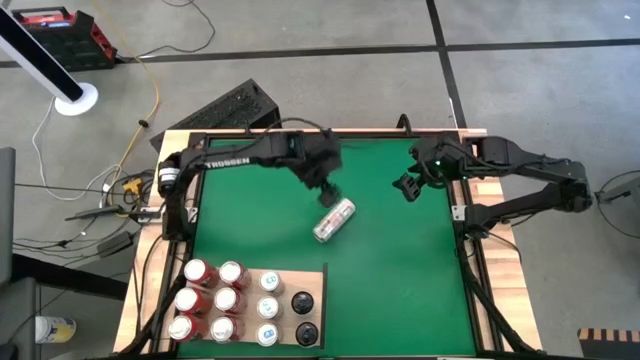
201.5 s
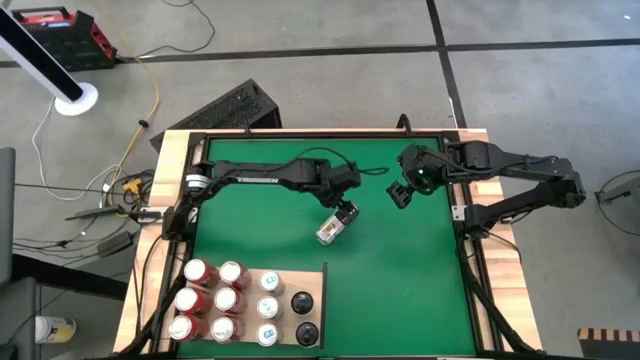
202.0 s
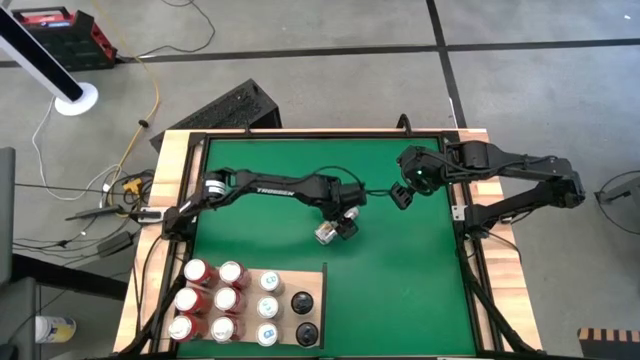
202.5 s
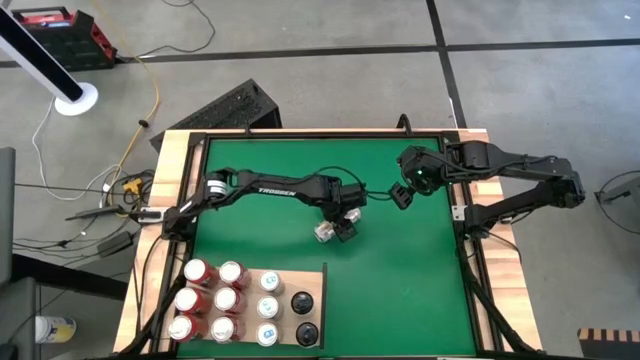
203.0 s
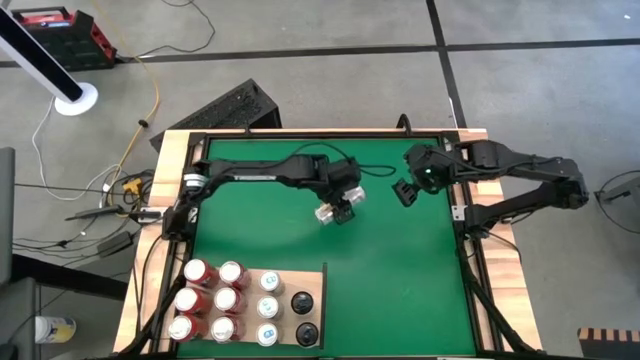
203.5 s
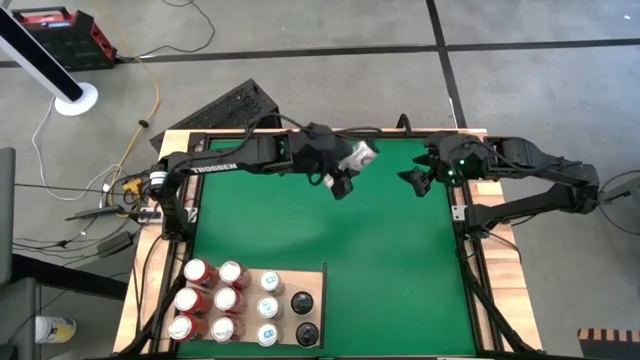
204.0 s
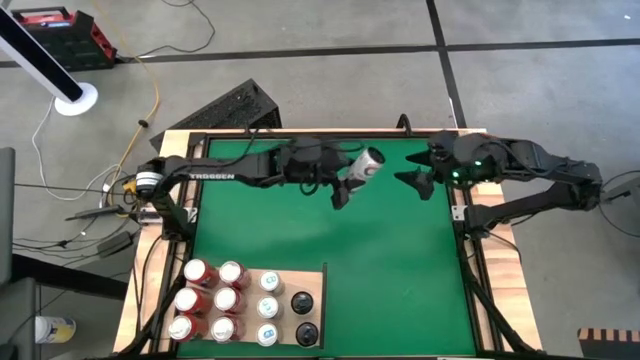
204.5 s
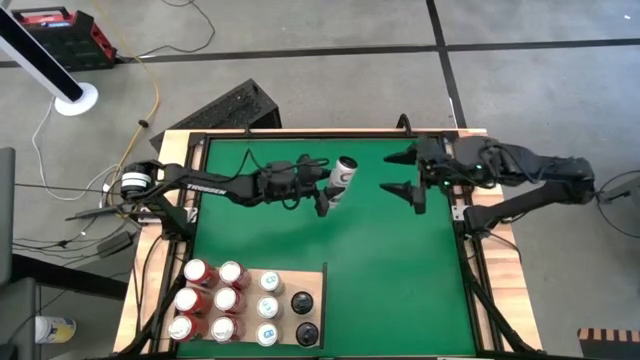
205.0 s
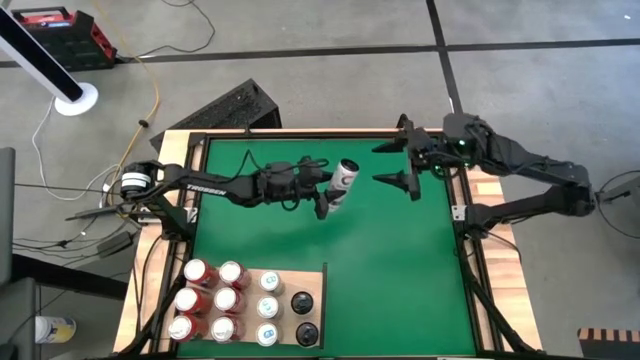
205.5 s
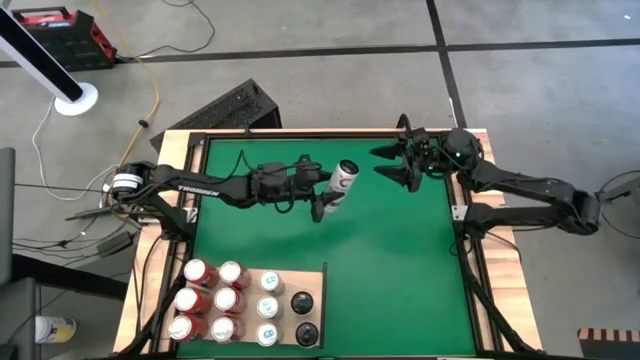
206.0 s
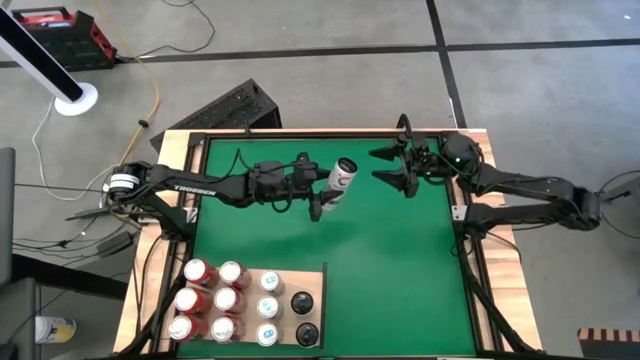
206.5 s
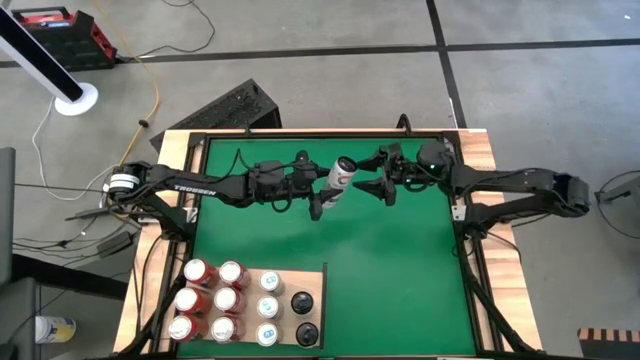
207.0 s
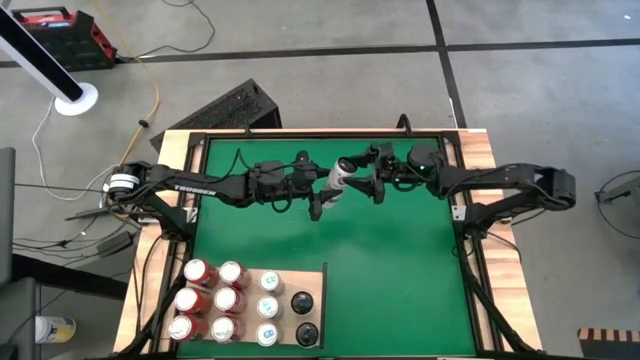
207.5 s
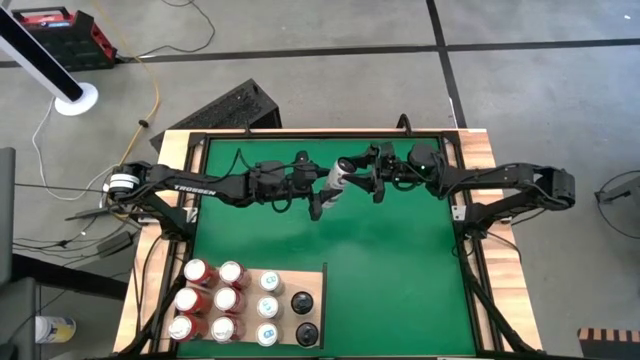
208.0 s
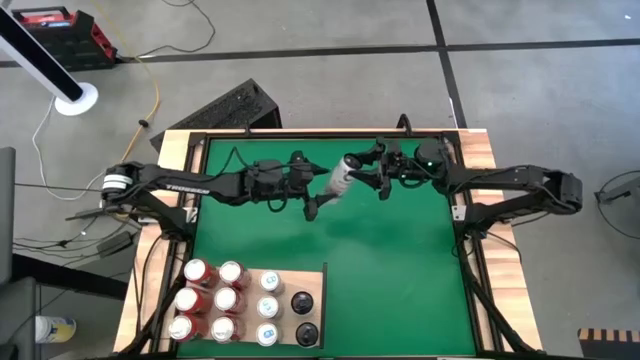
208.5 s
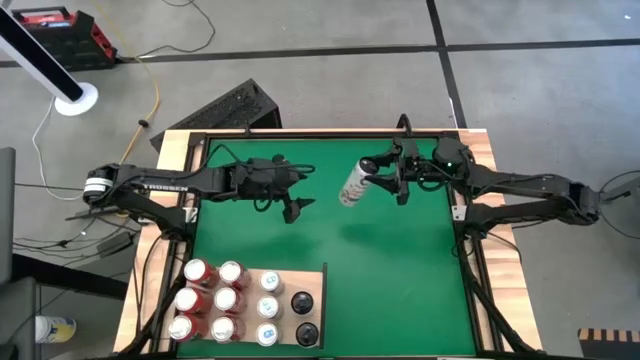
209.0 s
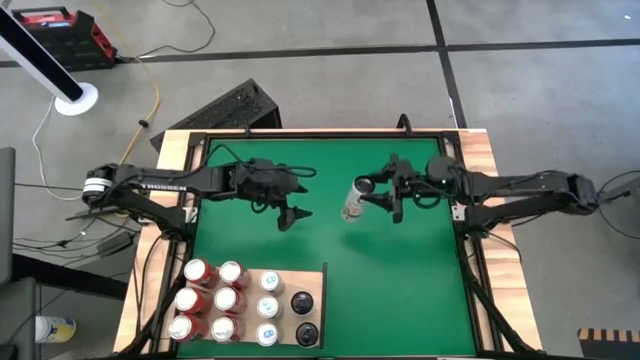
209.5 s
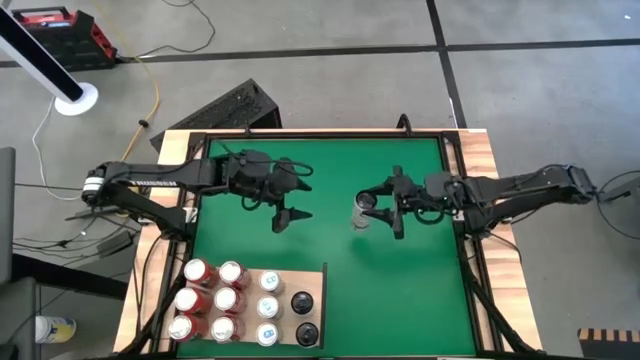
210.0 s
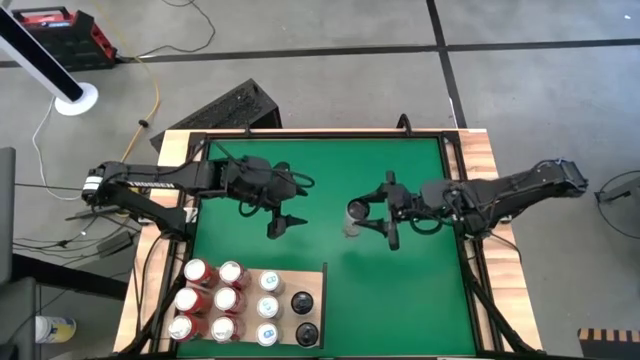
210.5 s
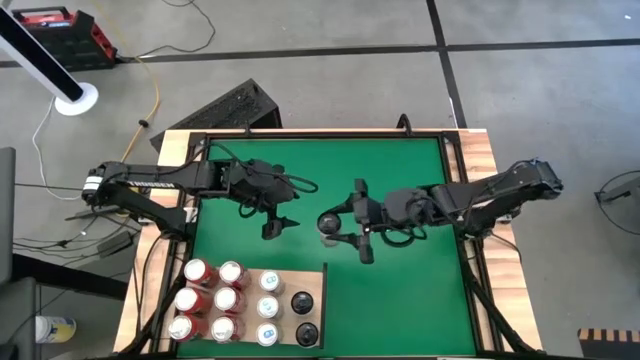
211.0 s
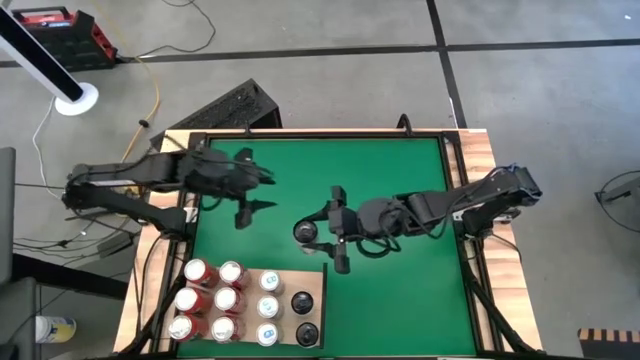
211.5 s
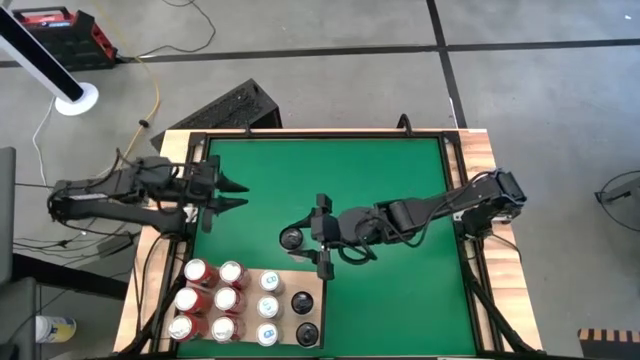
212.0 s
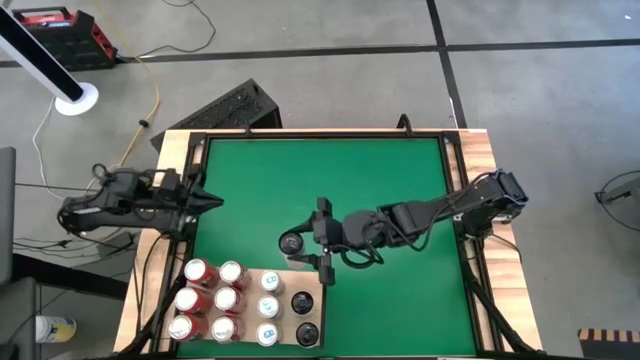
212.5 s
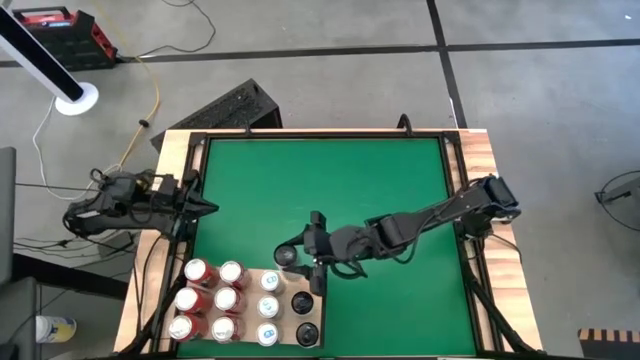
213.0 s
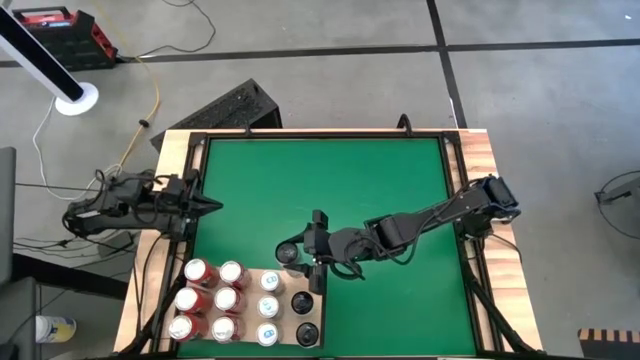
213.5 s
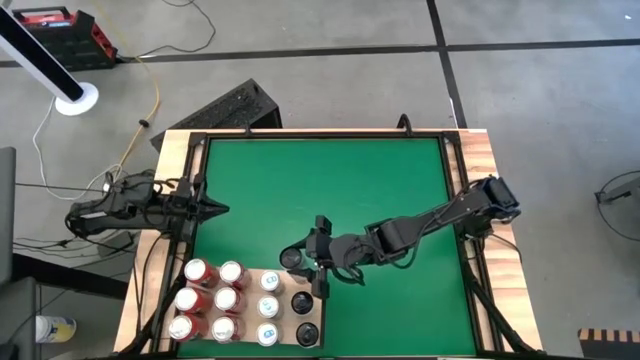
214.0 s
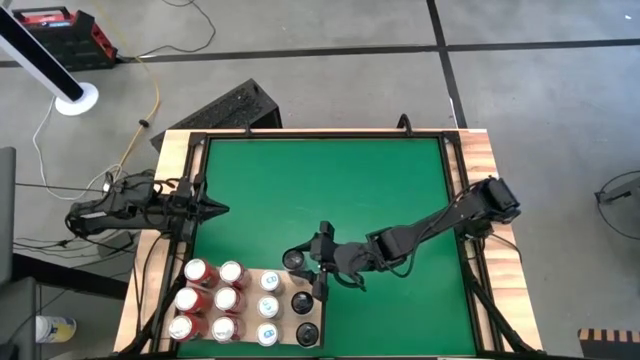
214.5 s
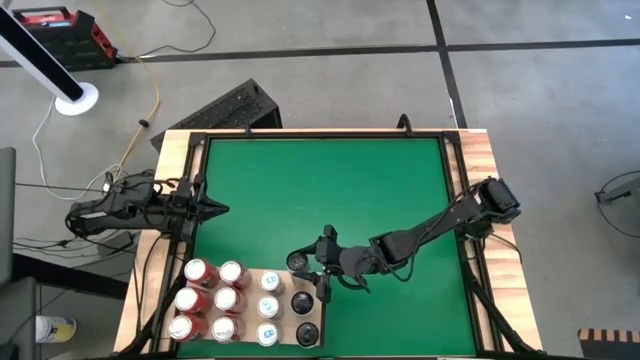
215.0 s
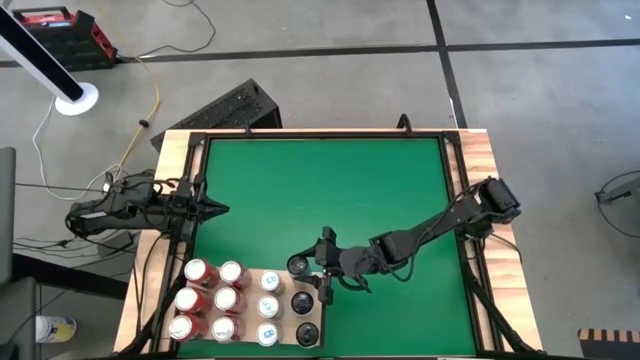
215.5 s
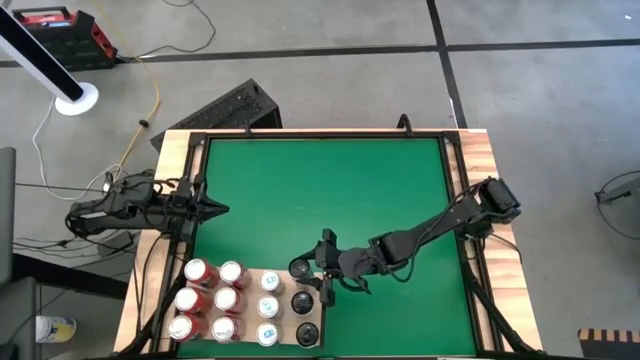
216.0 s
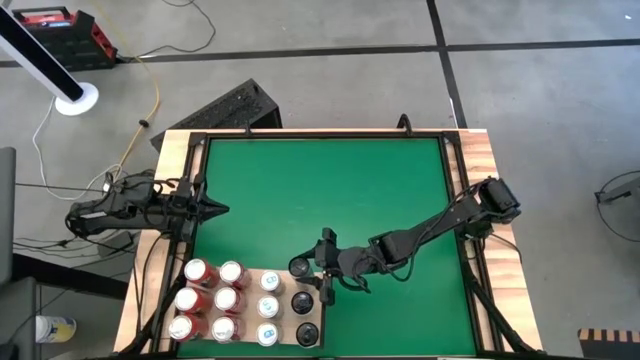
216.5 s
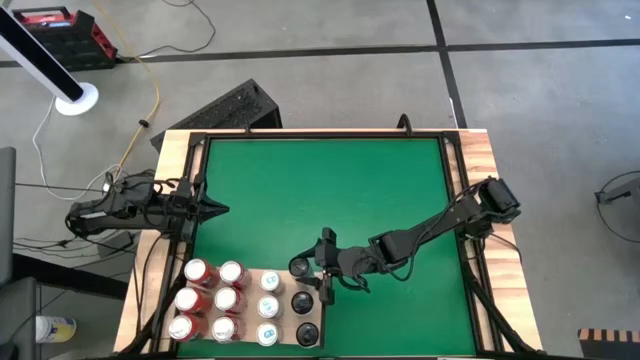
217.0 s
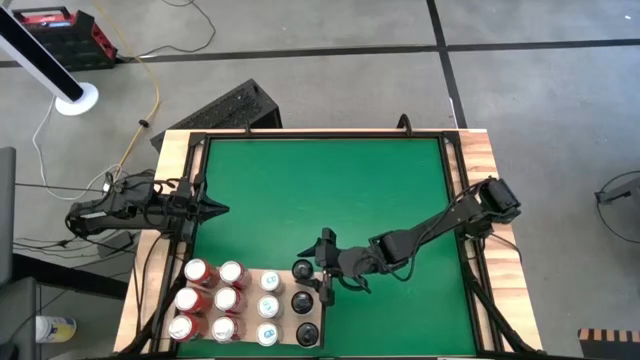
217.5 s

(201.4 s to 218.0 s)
Task: Place canned beverage on shelf
Put the white yellow soda can on the shelf aligned with the other white yellow soda cans

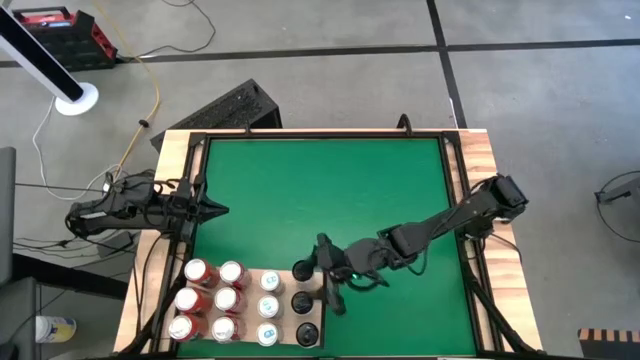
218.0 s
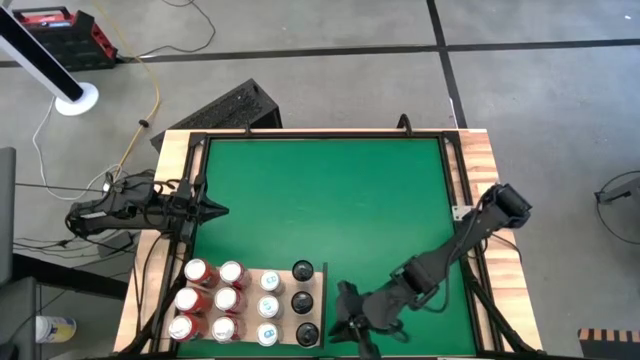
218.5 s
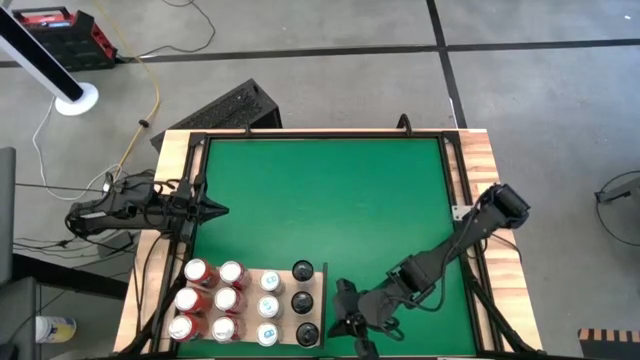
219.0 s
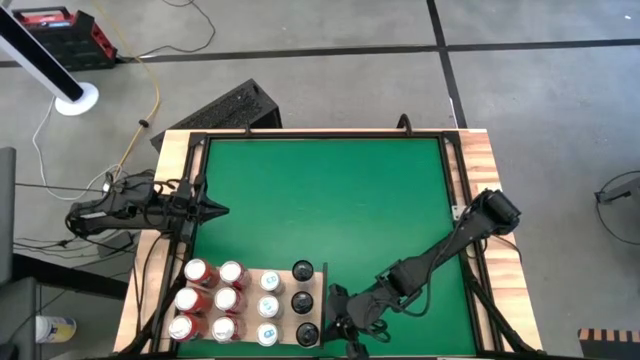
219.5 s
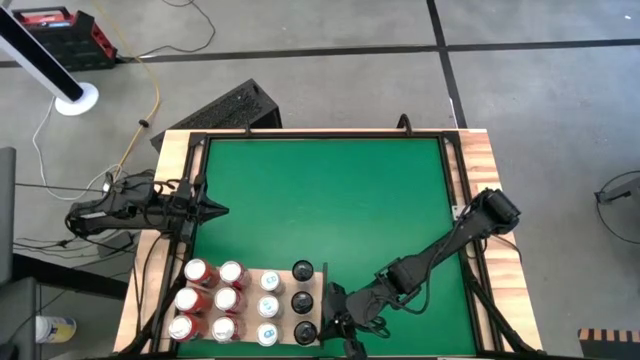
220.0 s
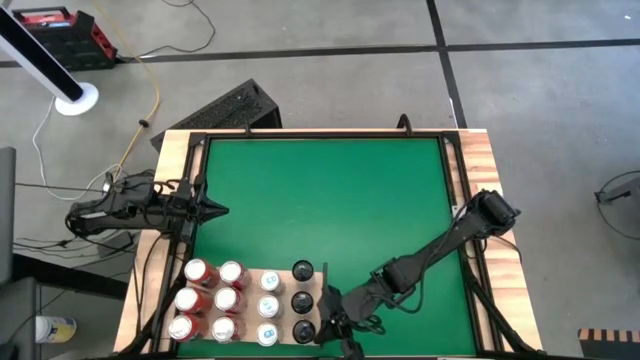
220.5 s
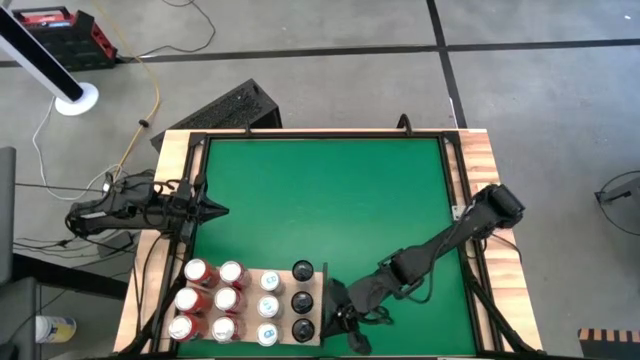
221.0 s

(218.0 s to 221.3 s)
Adjust the white yellow soda can
